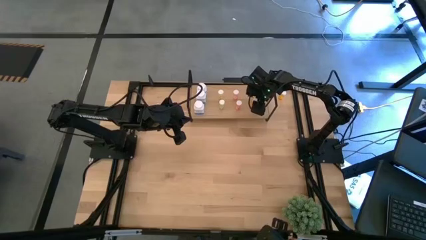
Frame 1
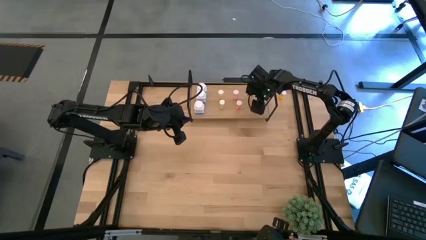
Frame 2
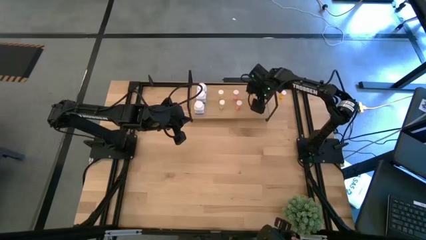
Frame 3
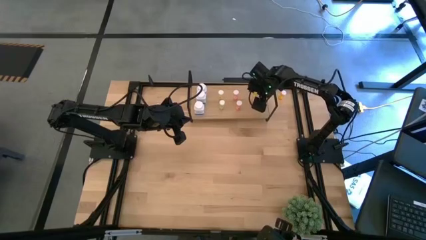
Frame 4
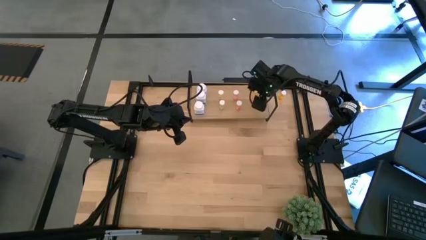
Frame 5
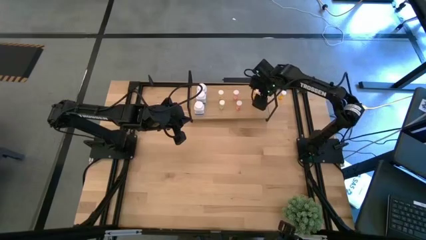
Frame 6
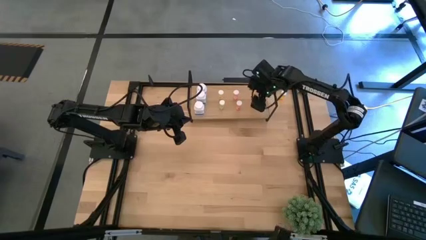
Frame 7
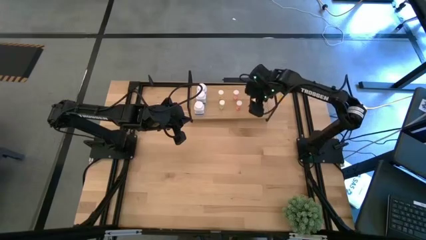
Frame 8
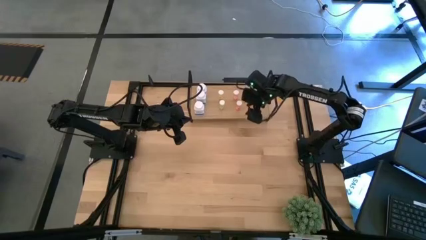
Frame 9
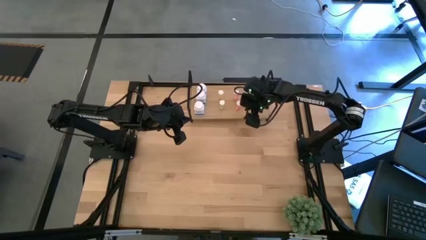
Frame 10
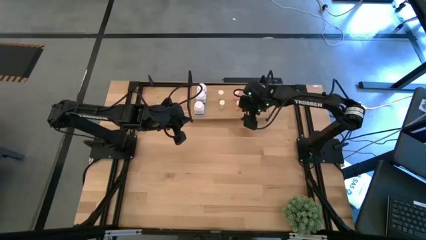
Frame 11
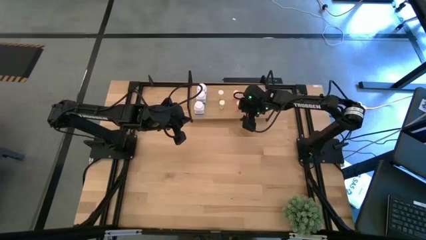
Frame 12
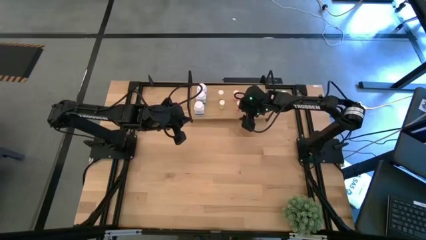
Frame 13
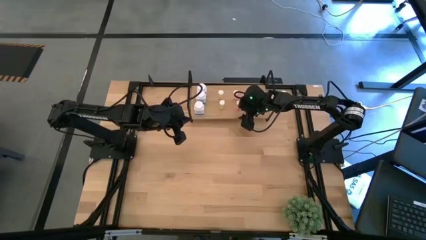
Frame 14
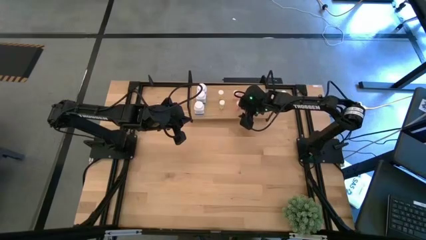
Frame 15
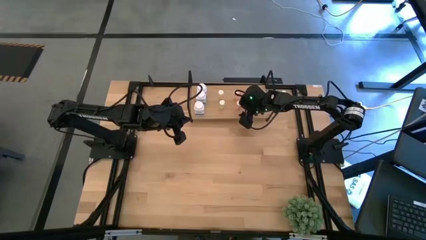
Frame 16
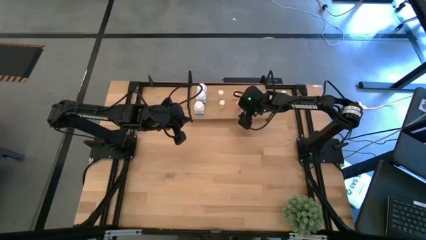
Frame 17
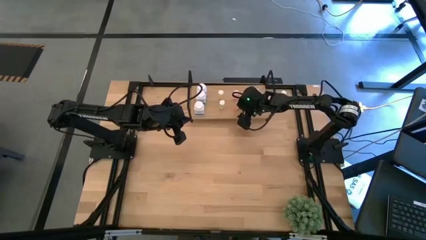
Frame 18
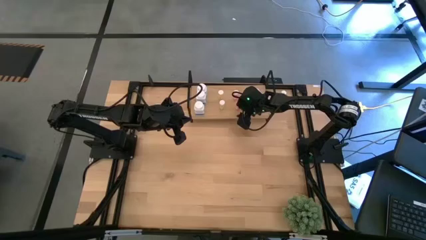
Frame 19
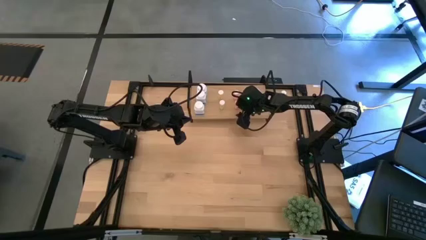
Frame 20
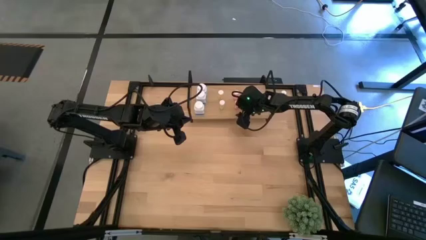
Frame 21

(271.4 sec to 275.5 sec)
Task: Pick and place medicine bottles onto shelf by color
Adjust the red pill bottle on the shelf

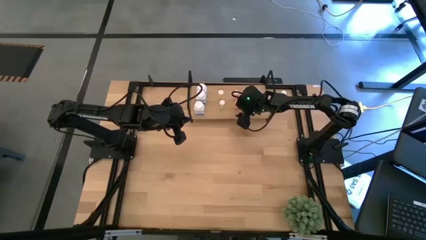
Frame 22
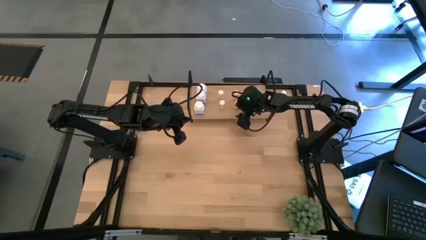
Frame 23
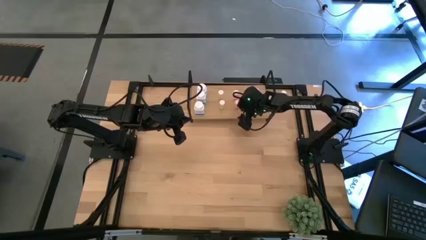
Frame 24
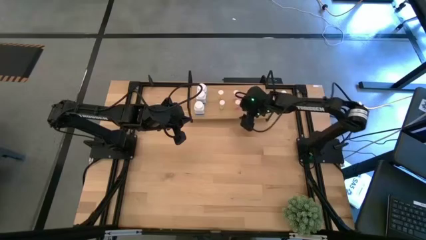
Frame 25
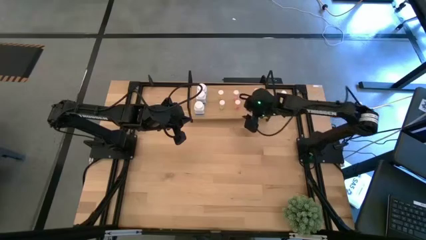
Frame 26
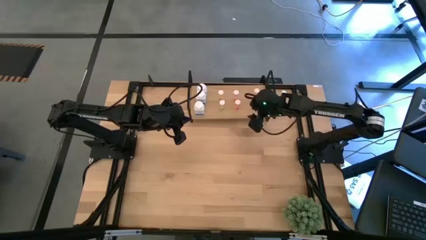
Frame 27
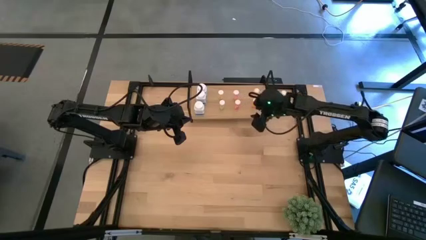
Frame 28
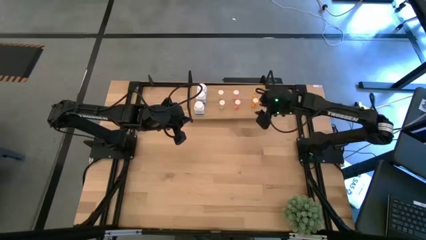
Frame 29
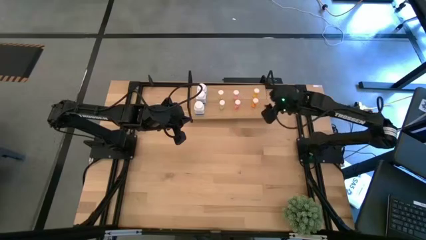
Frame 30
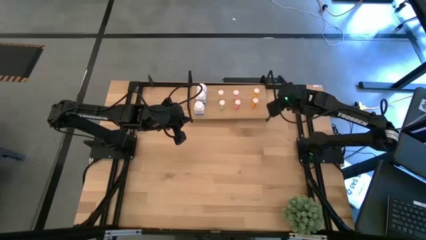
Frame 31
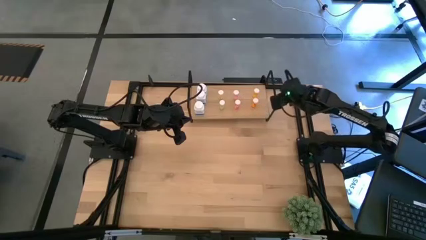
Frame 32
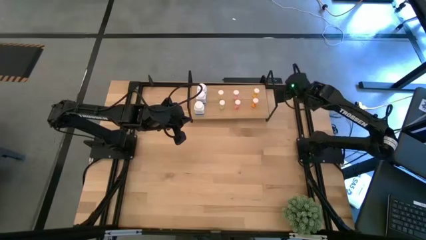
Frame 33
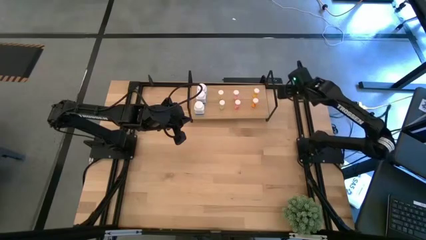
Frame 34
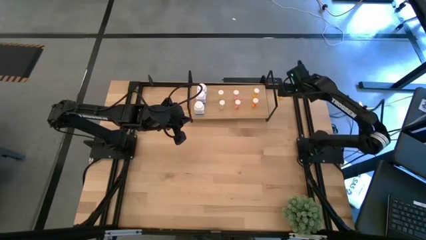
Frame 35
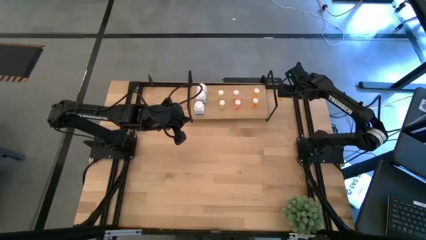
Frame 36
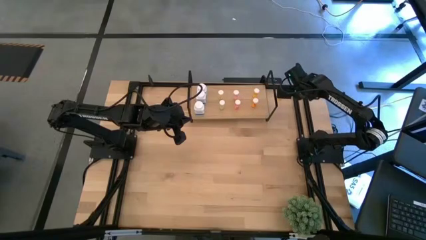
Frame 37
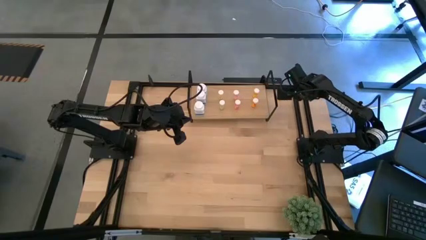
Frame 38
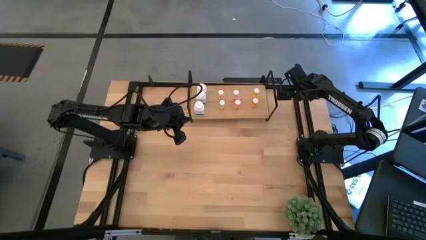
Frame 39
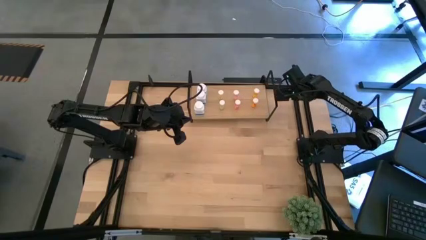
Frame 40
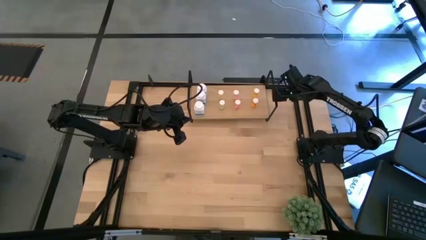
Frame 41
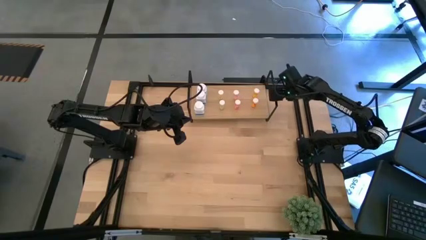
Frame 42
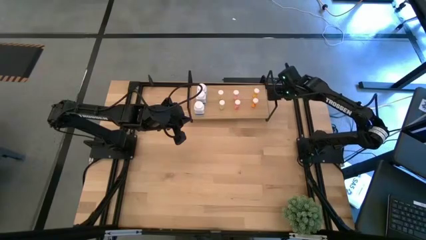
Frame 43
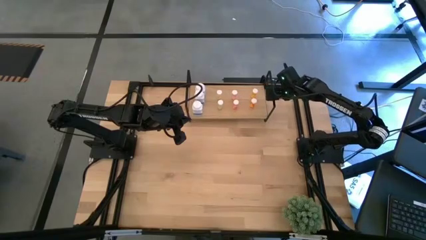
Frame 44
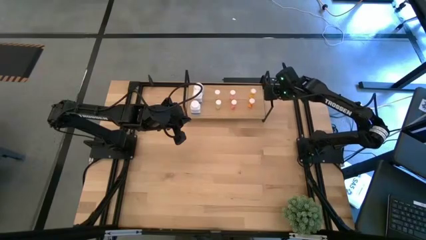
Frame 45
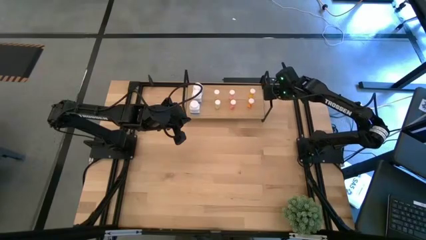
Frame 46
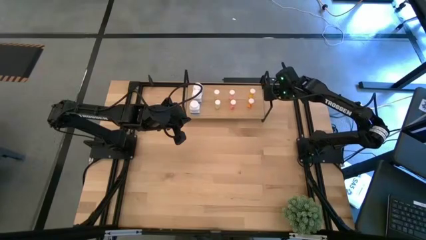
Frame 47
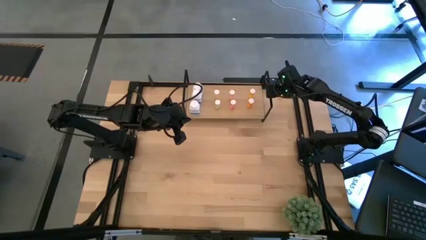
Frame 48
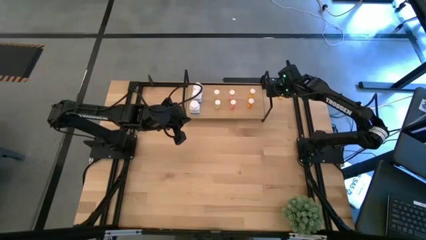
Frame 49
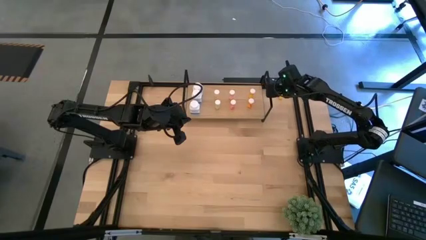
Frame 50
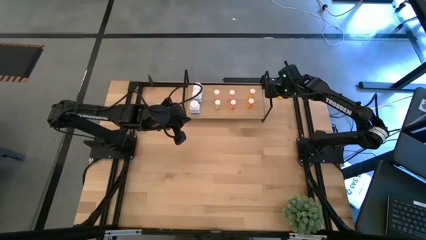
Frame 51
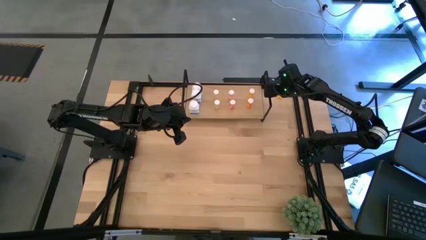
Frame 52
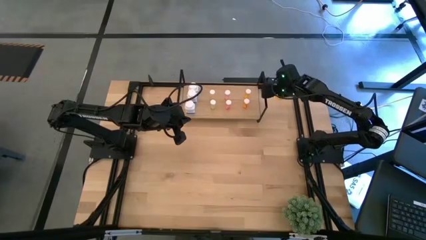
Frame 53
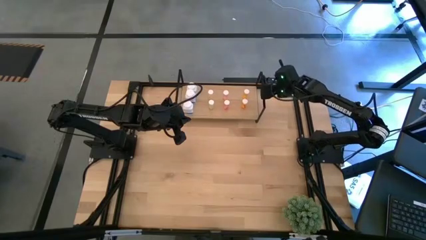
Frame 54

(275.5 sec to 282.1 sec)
Adjust the shelf
